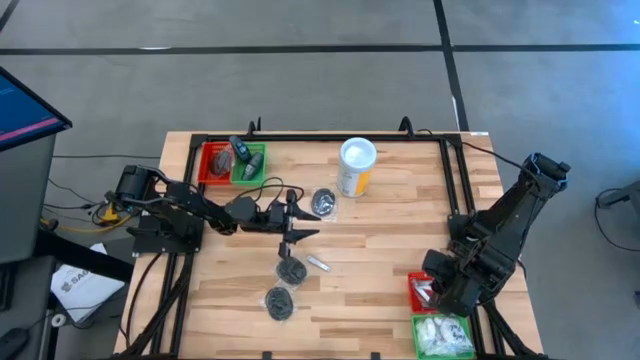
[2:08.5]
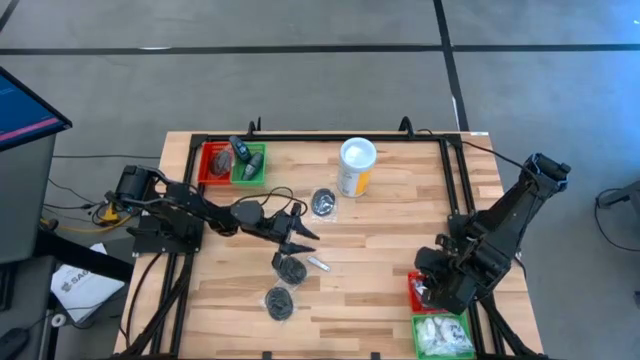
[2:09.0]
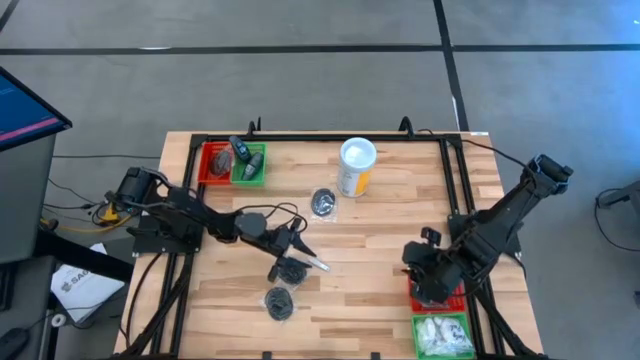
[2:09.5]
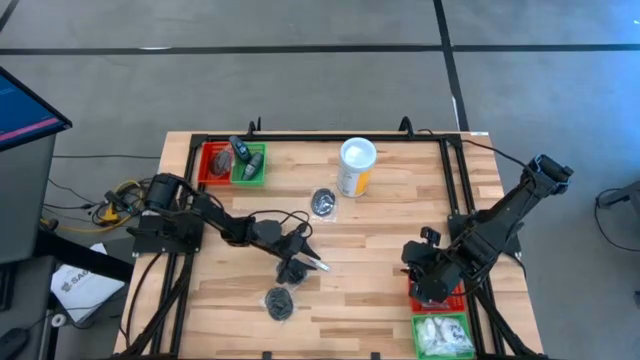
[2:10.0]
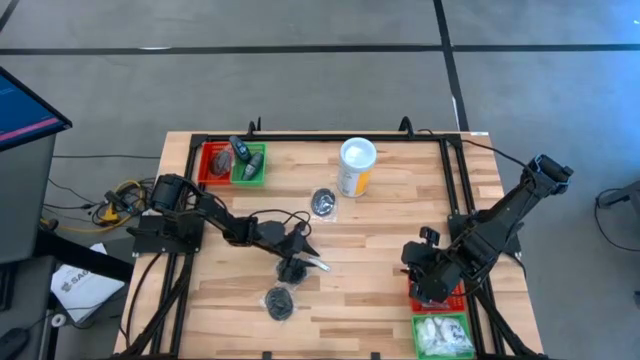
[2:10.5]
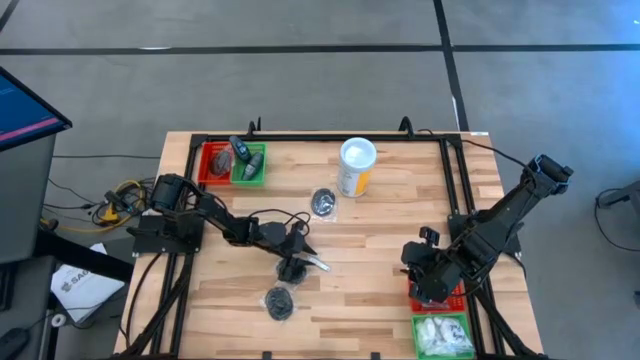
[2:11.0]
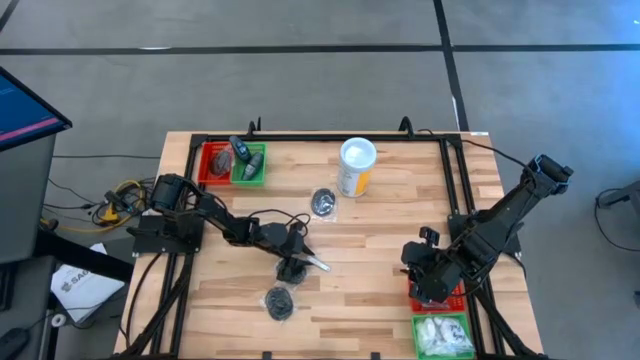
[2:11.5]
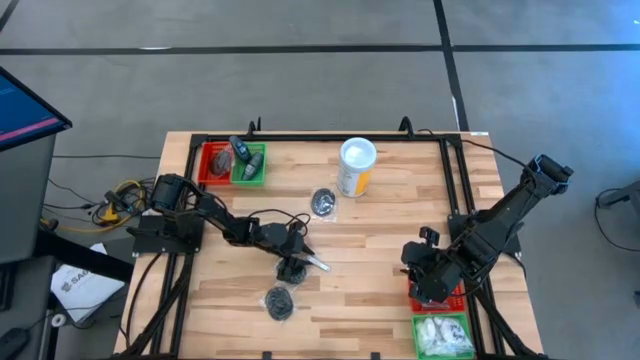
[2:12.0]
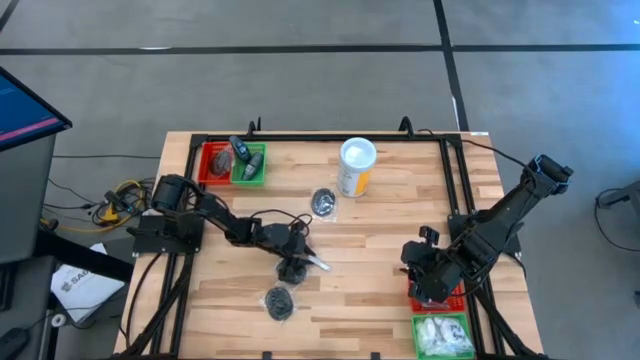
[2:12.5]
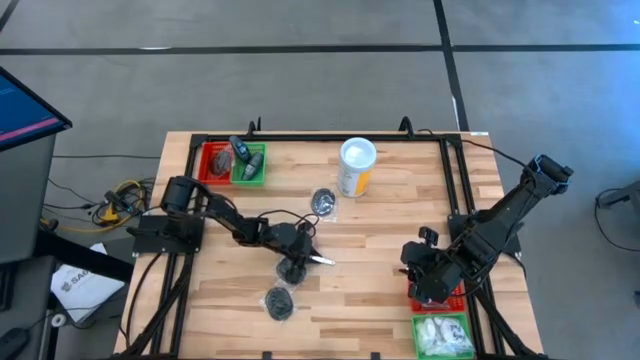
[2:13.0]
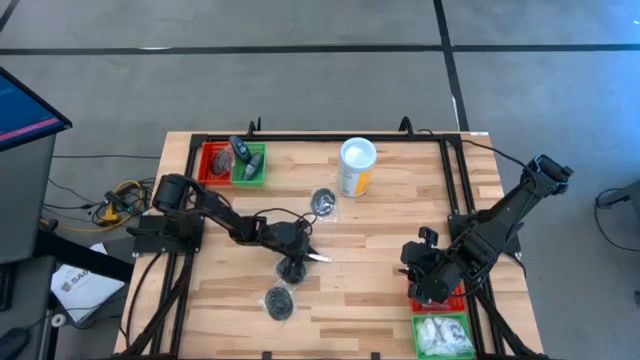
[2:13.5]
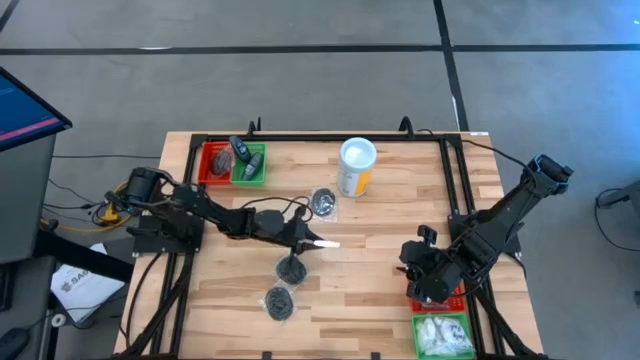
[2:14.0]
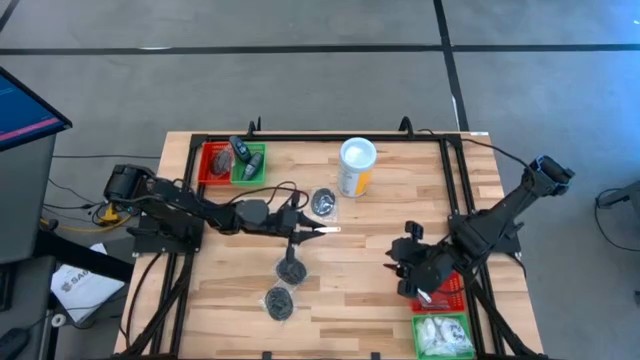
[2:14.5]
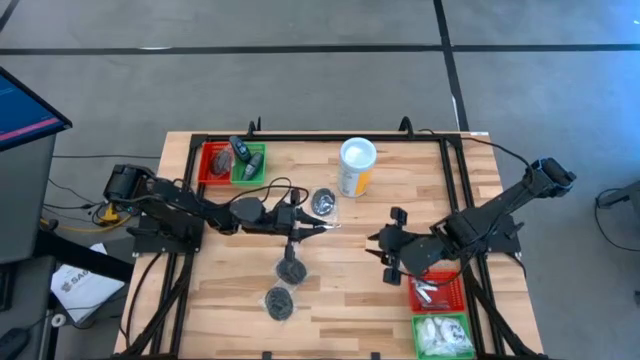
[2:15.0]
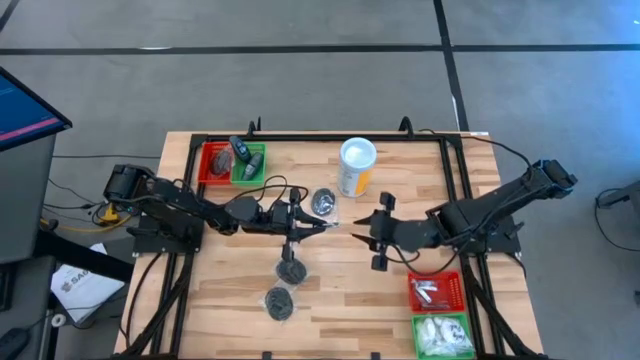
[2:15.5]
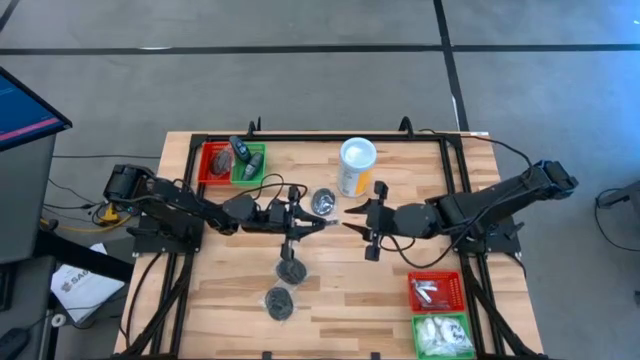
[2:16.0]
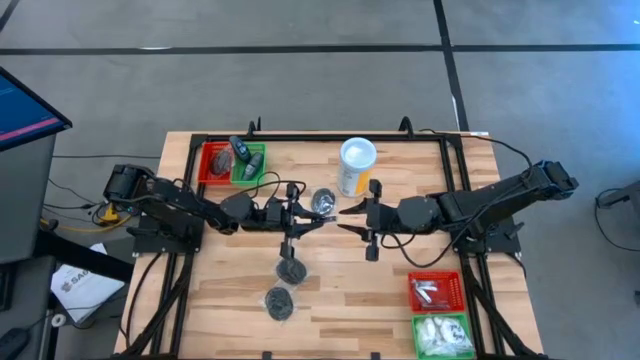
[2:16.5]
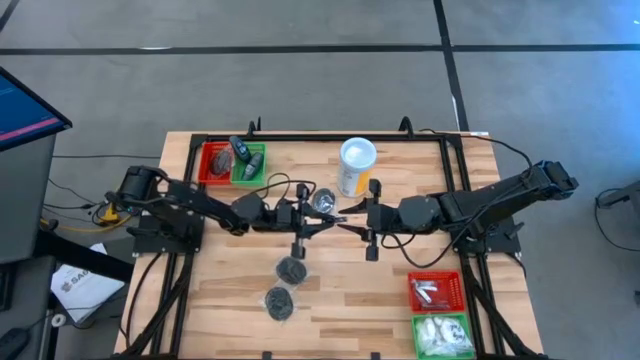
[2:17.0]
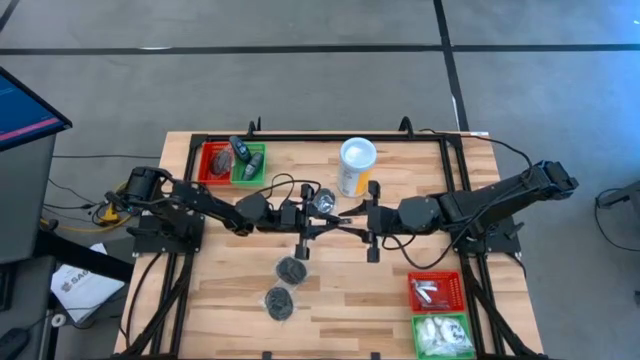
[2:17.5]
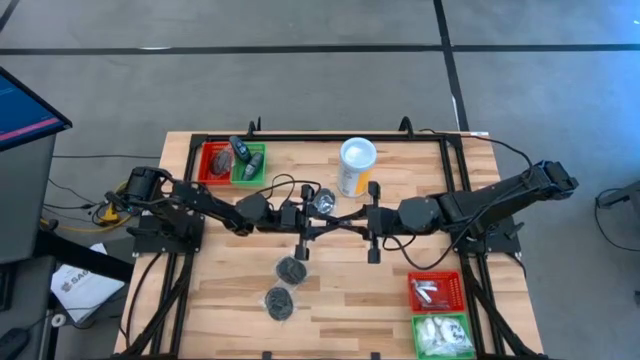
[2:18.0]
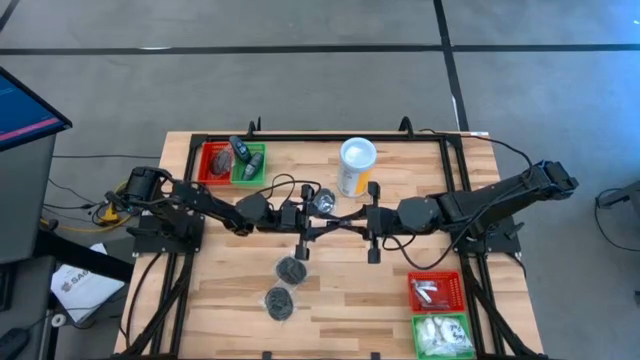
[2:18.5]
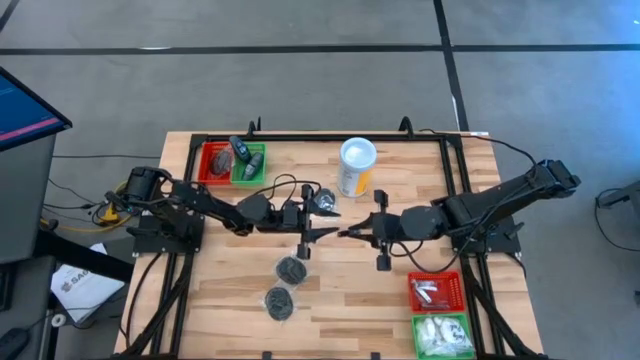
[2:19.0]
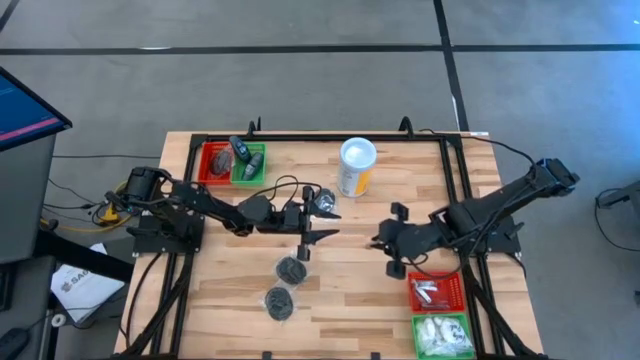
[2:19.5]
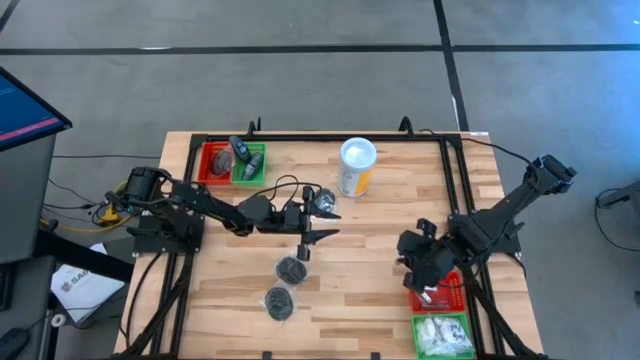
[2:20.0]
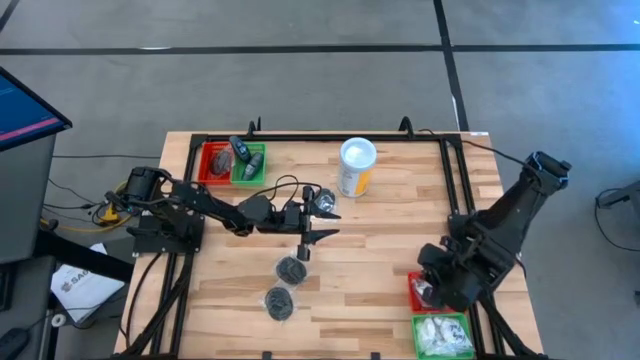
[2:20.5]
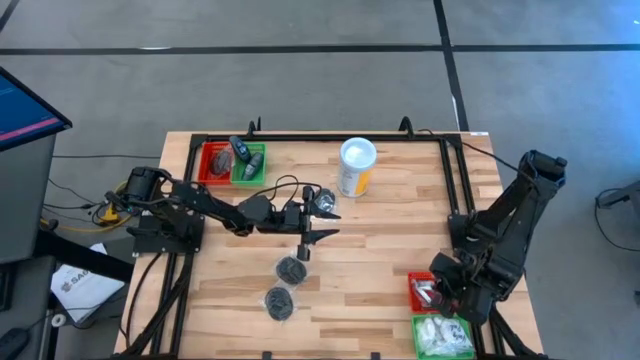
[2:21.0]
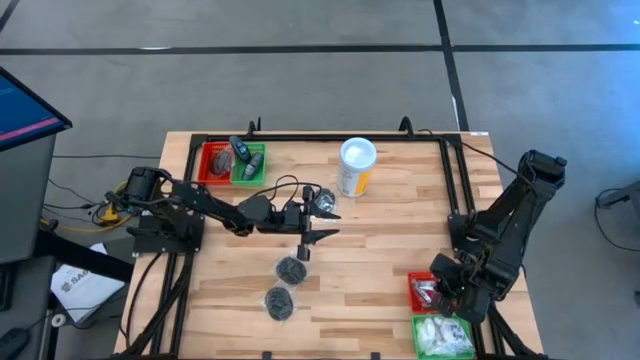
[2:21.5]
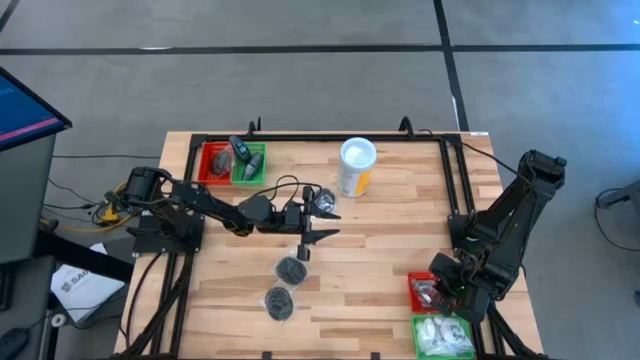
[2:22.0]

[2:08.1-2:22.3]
Task: Pick & Place Travel size toiletries
Put the silver nail cutter into the bottom red bin

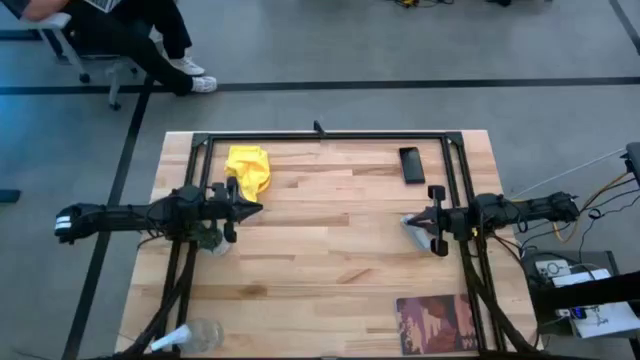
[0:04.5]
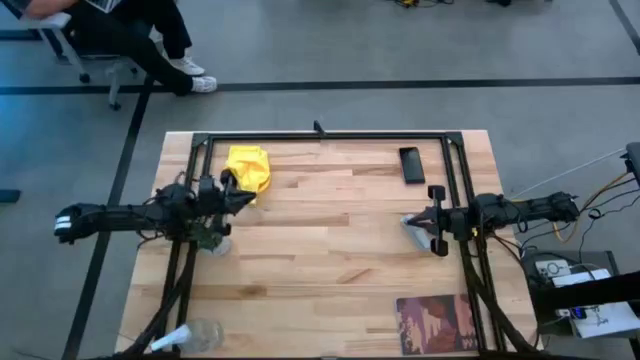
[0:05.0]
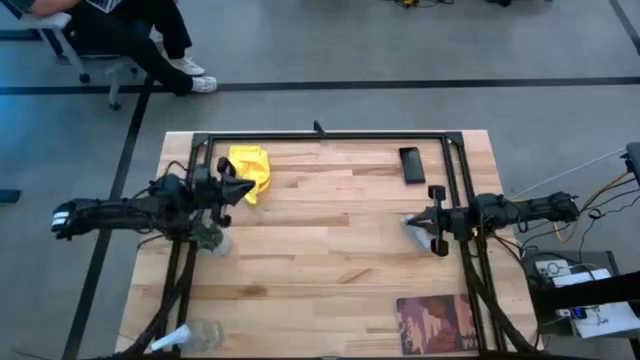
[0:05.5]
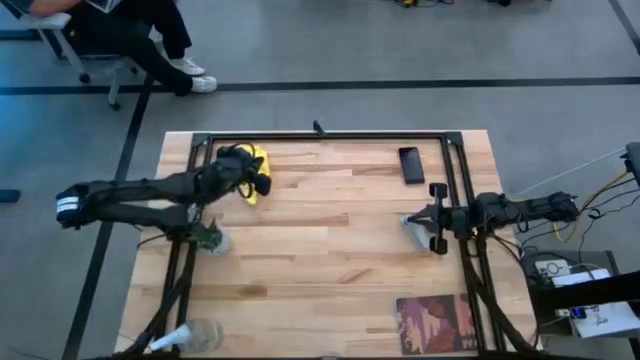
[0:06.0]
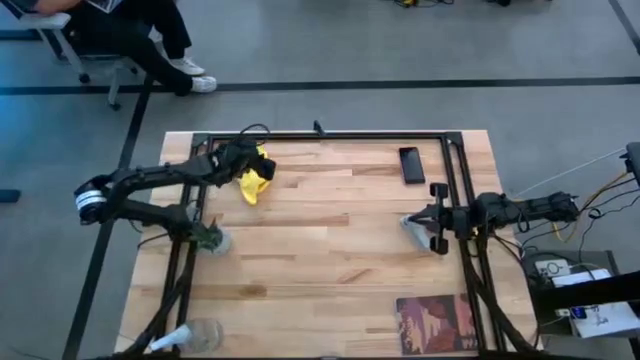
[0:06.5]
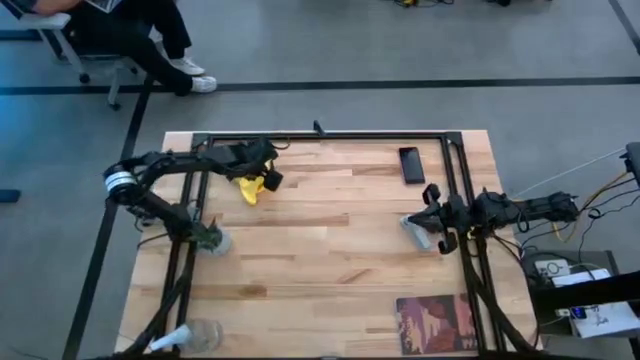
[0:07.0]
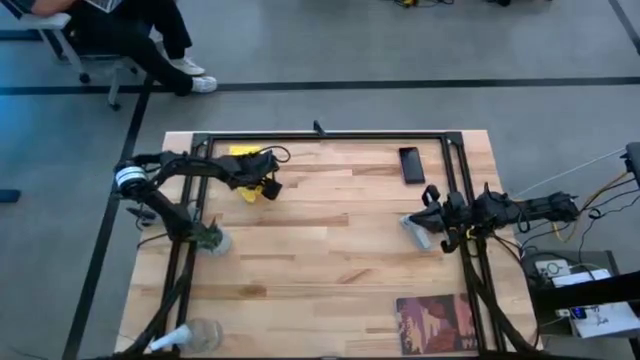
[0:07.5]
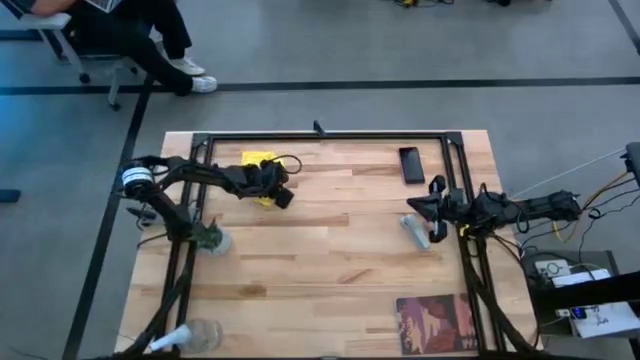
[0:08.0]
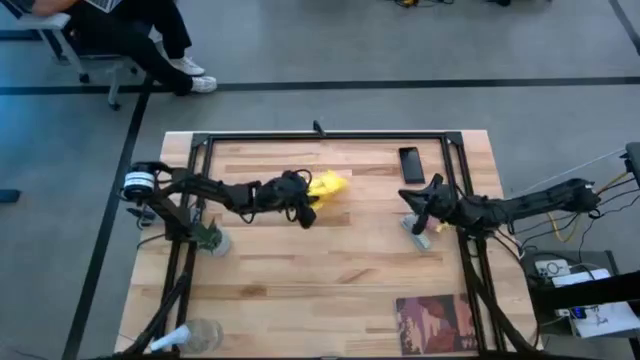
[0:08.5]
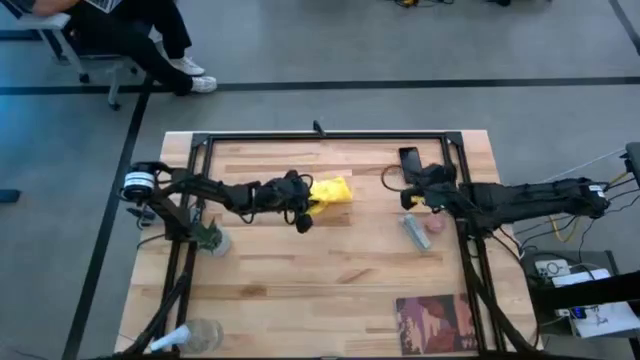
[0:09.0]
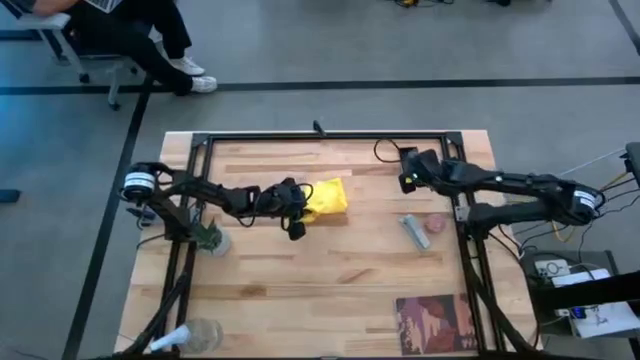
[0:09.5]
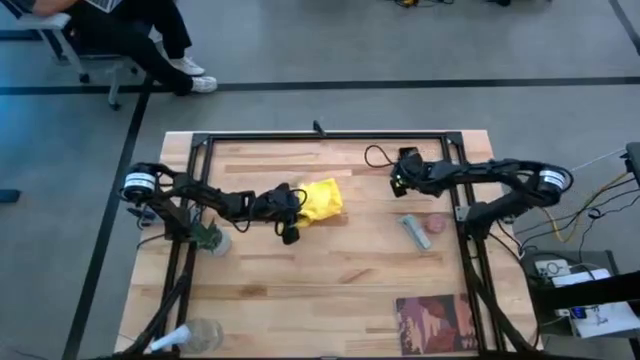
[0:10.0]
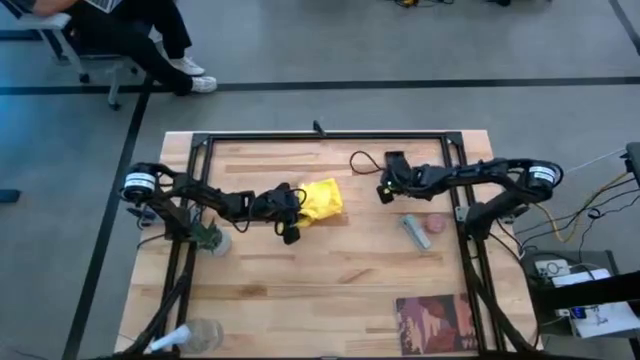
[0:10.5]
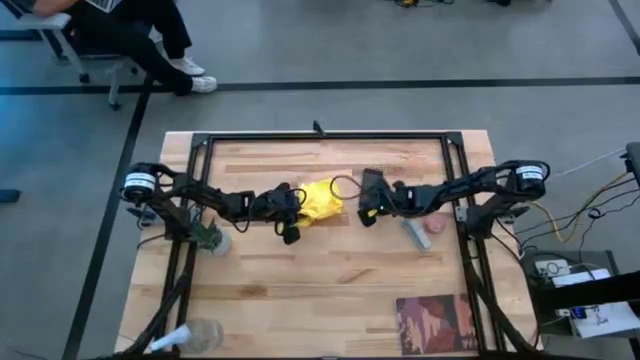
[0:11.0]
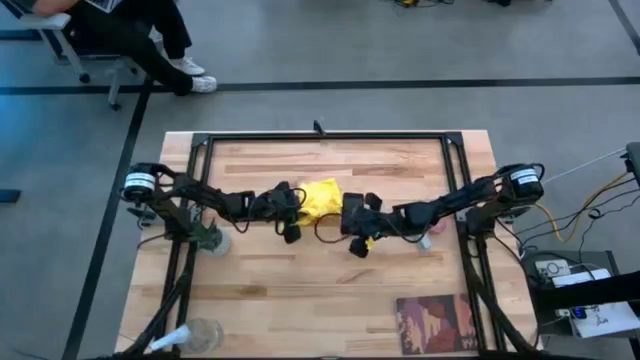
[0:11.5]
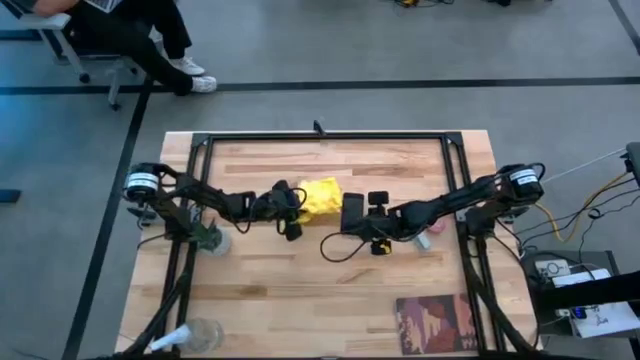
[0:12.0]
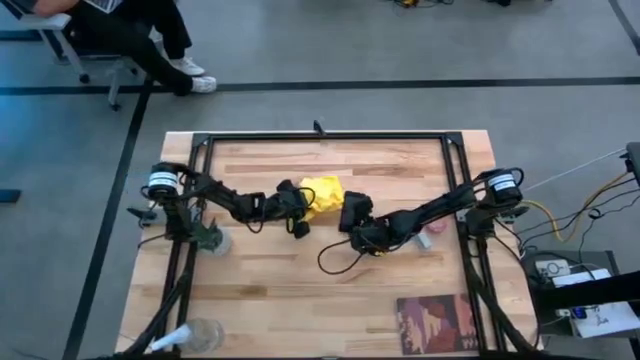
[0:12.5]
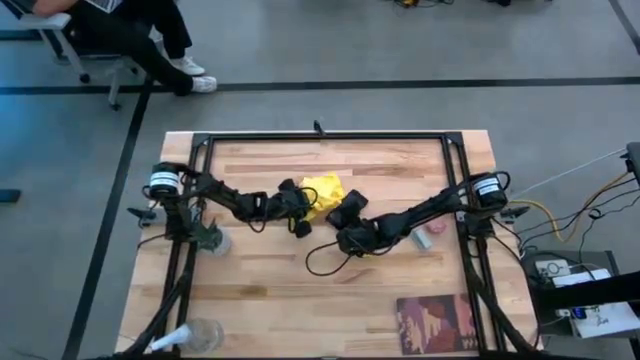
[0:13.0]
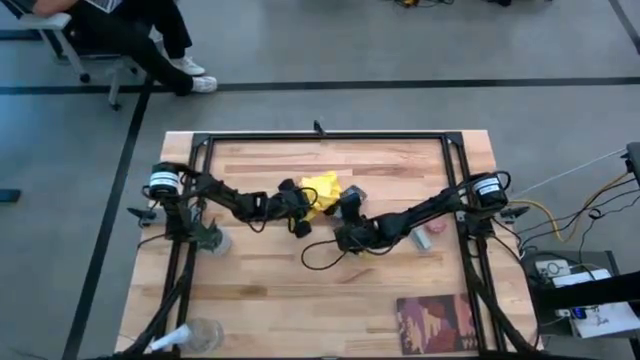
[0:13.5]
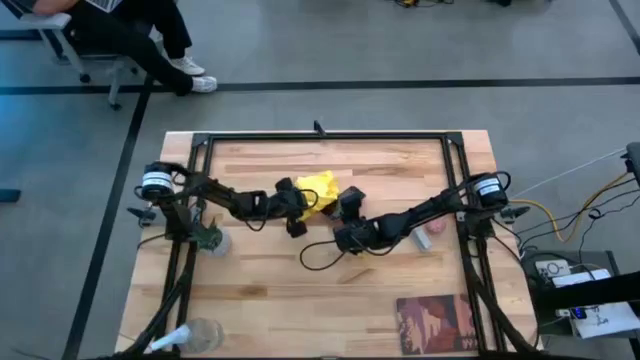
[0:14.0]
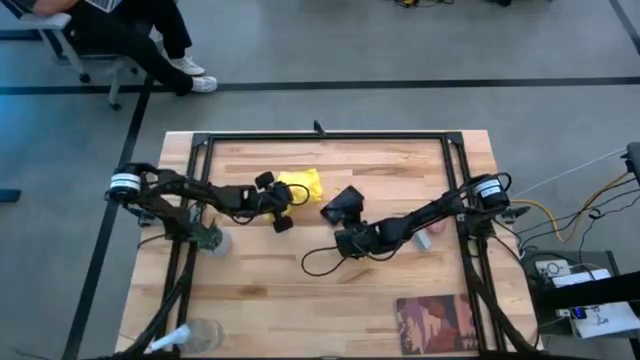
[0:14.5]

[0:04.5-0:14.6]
Task: Apply microfiber cloth
Spray the front and back of the cellphone using the spray bottle
